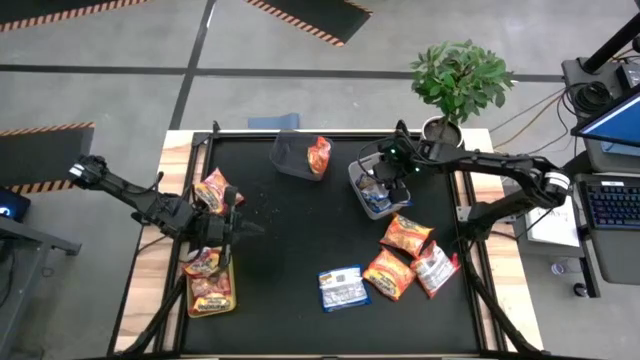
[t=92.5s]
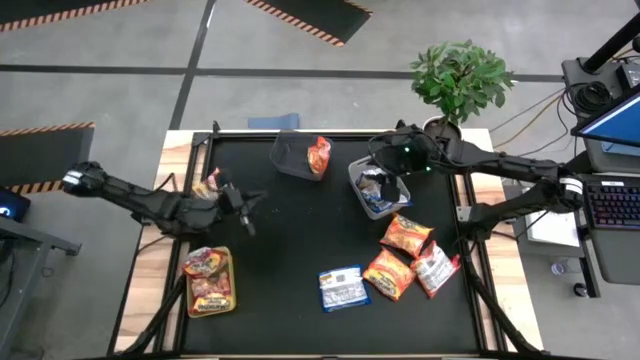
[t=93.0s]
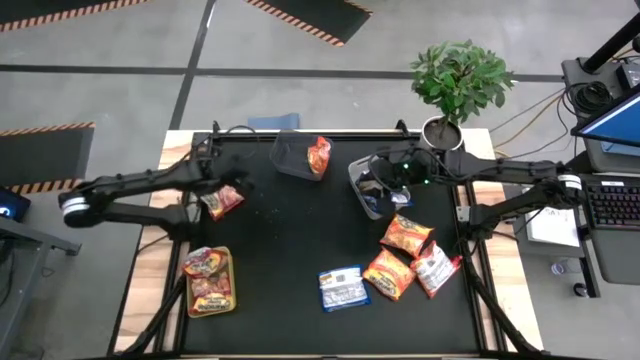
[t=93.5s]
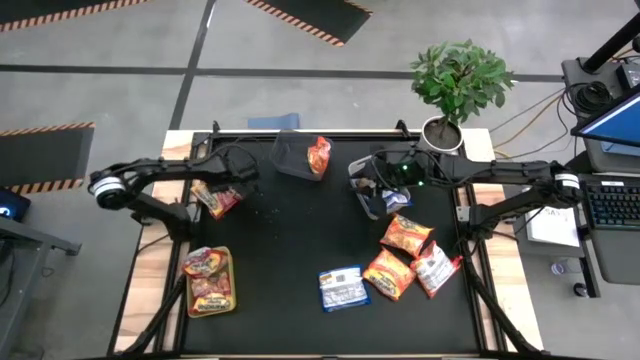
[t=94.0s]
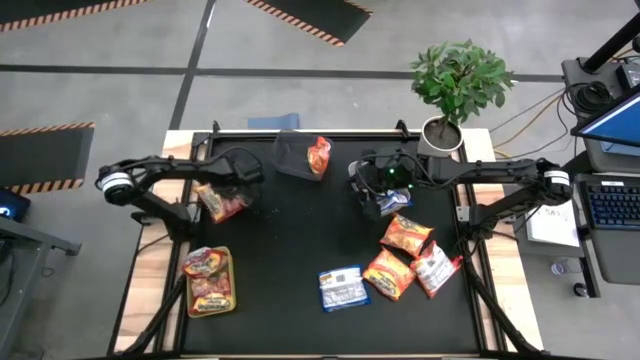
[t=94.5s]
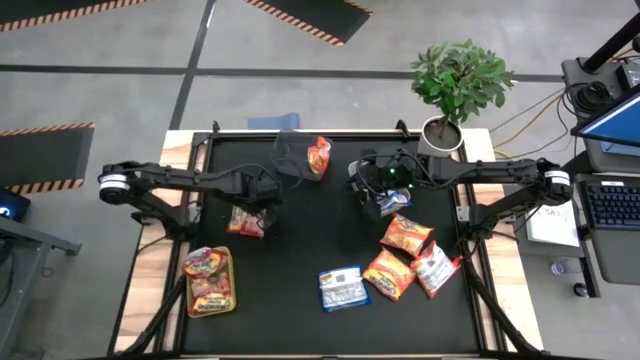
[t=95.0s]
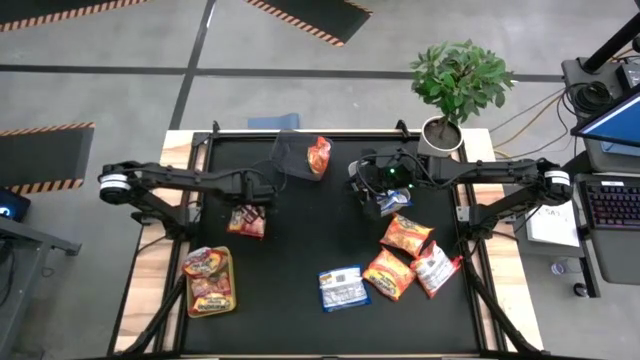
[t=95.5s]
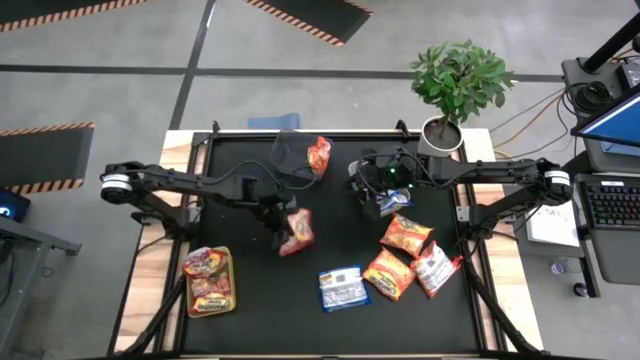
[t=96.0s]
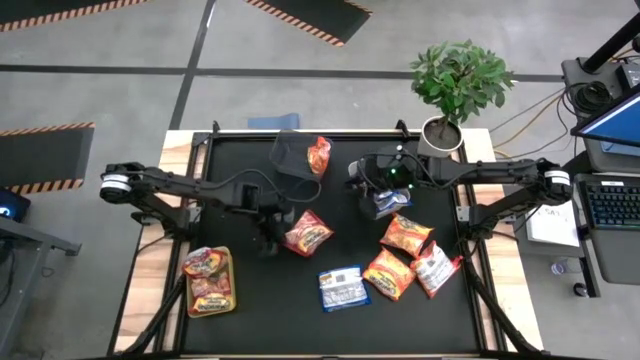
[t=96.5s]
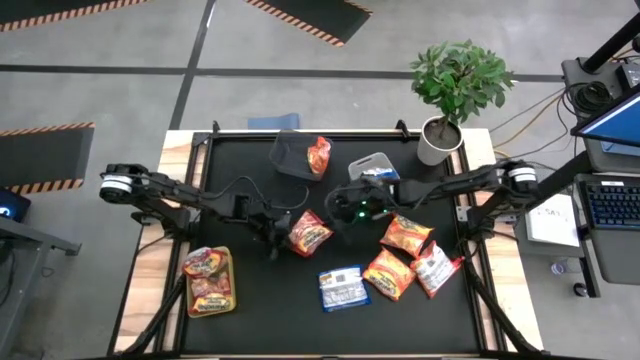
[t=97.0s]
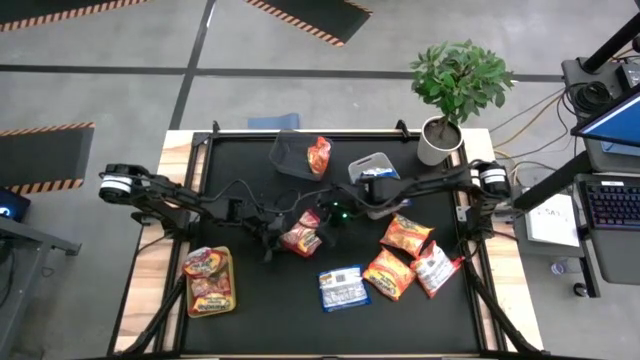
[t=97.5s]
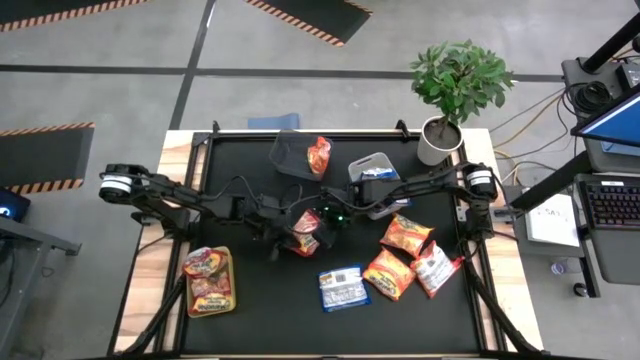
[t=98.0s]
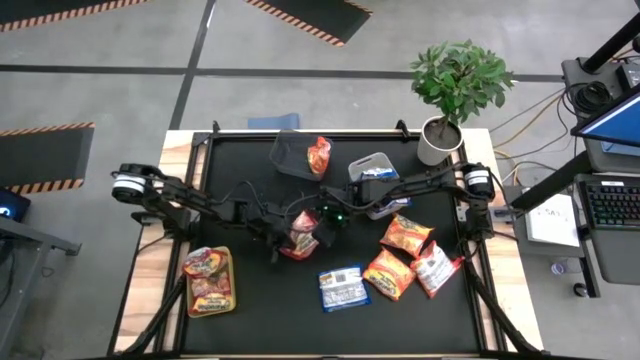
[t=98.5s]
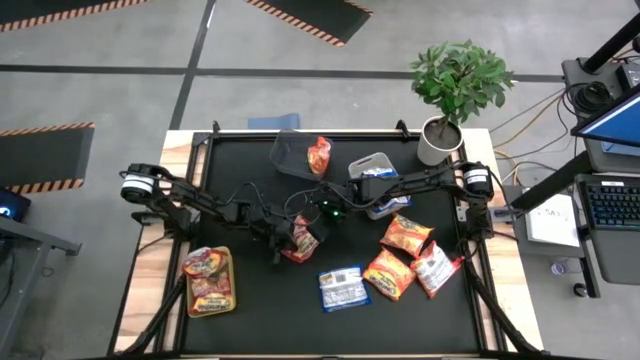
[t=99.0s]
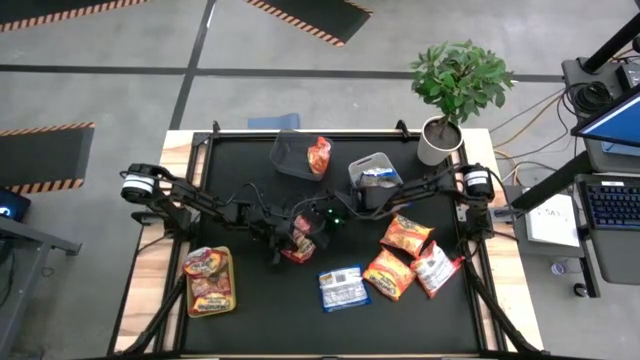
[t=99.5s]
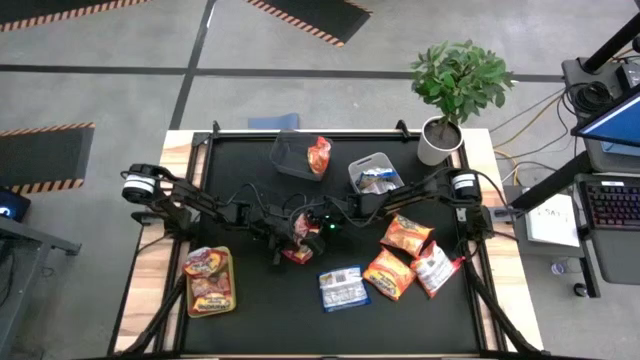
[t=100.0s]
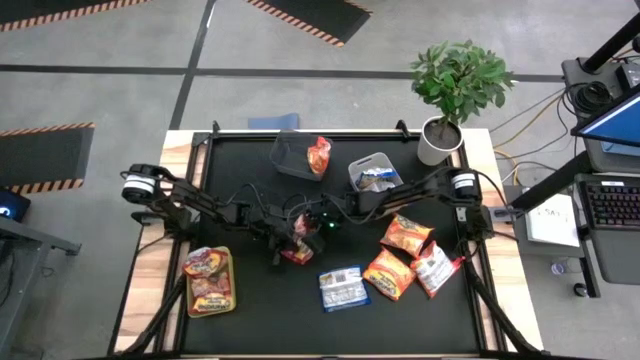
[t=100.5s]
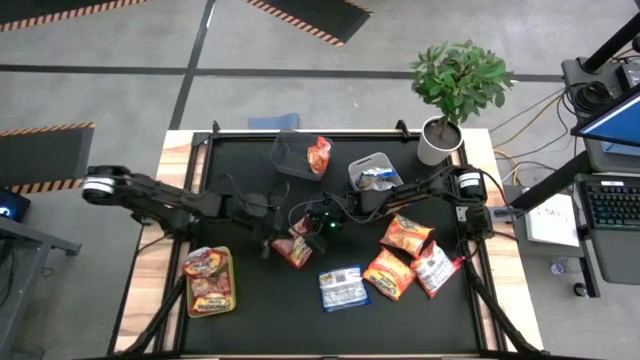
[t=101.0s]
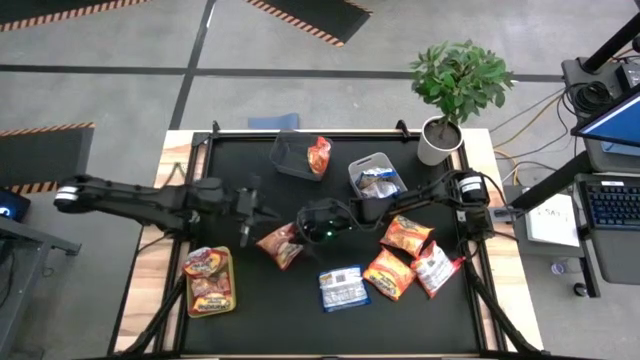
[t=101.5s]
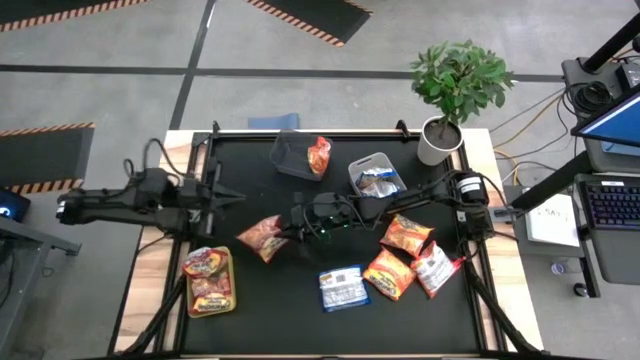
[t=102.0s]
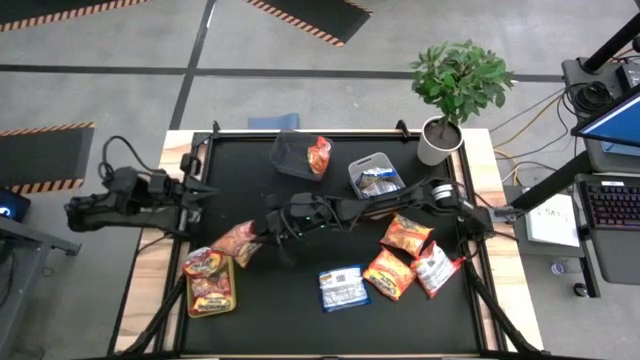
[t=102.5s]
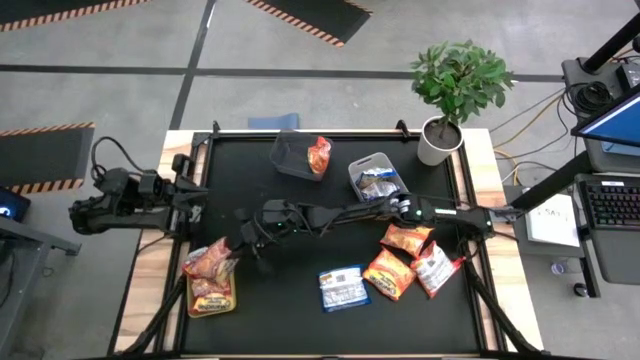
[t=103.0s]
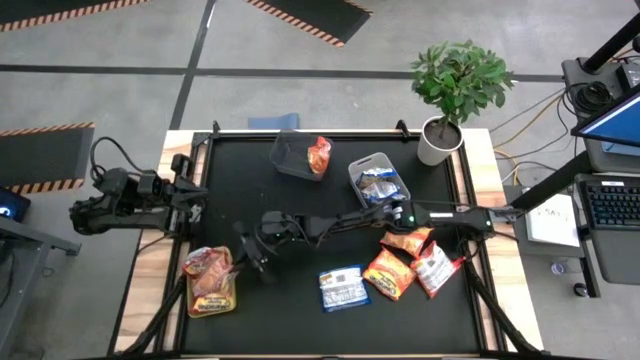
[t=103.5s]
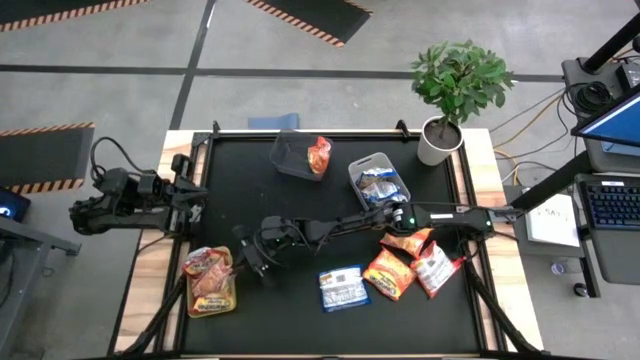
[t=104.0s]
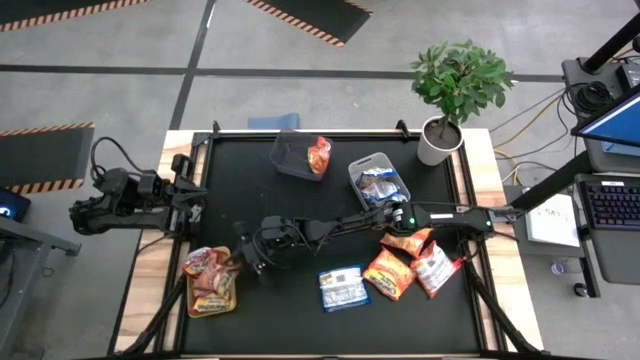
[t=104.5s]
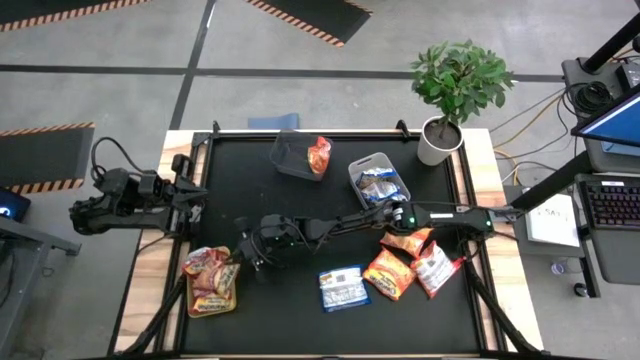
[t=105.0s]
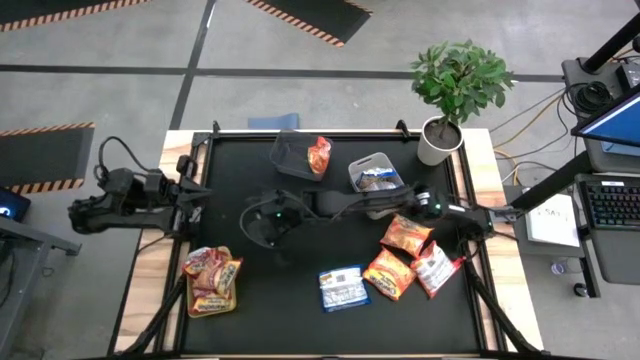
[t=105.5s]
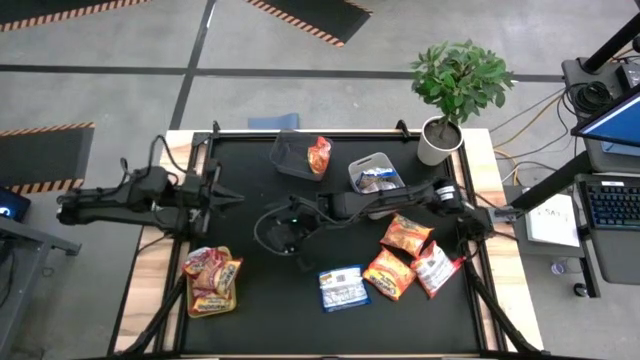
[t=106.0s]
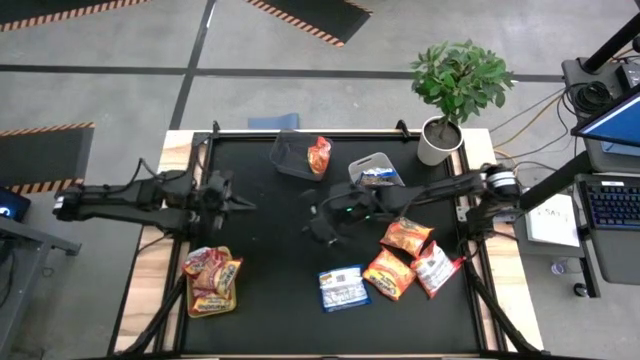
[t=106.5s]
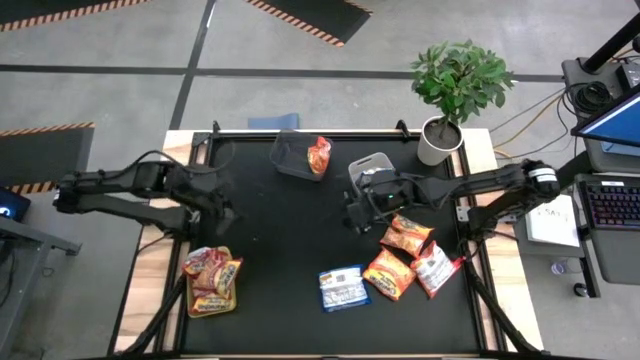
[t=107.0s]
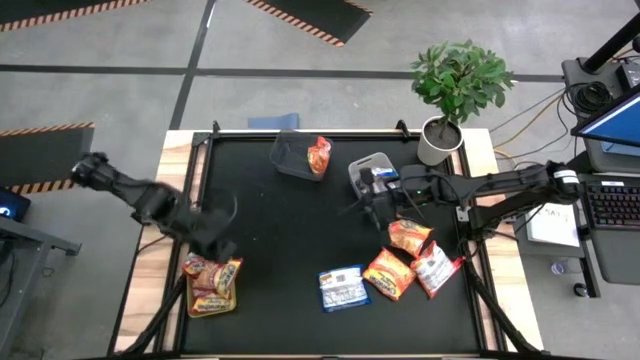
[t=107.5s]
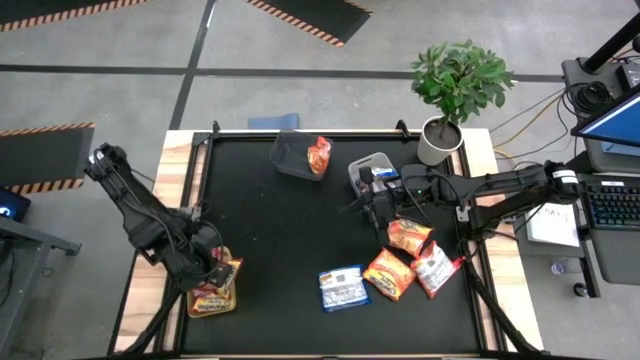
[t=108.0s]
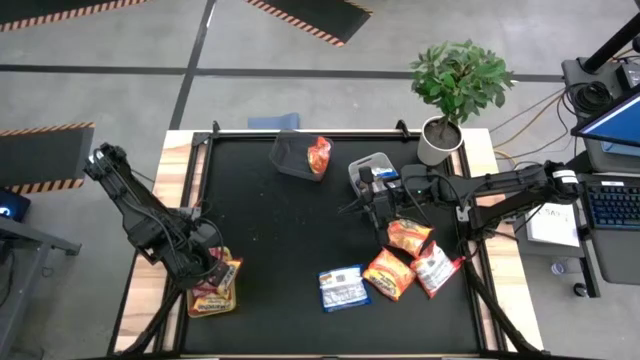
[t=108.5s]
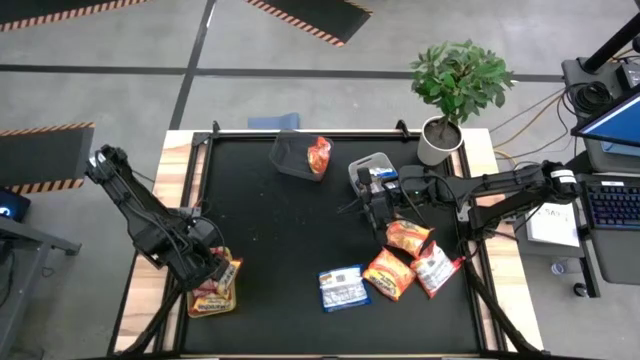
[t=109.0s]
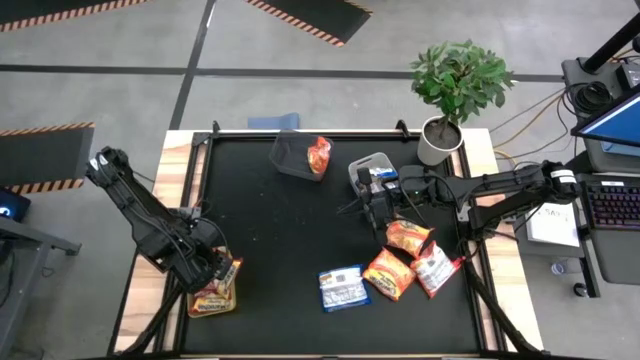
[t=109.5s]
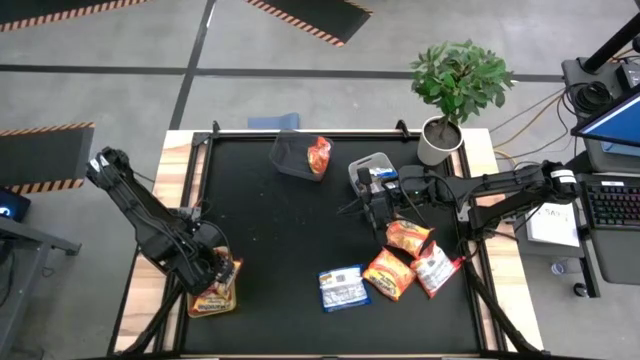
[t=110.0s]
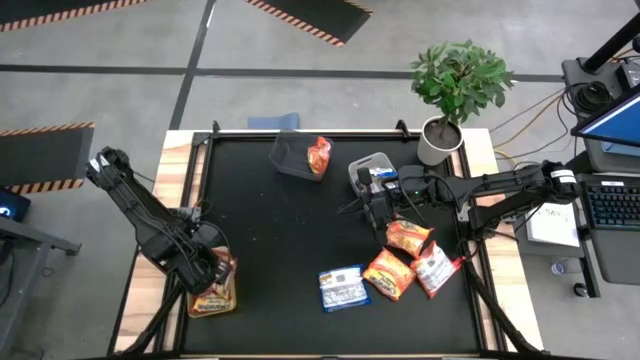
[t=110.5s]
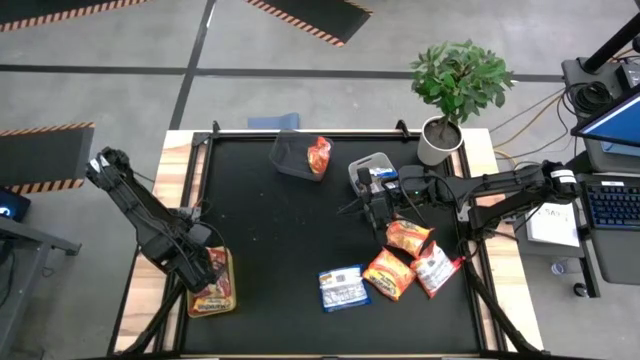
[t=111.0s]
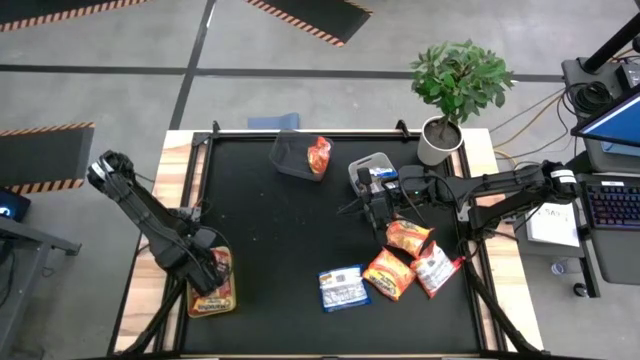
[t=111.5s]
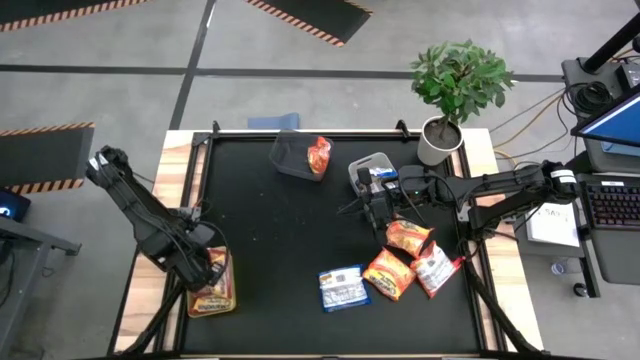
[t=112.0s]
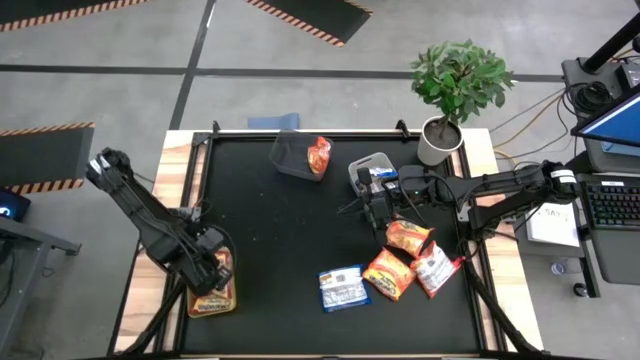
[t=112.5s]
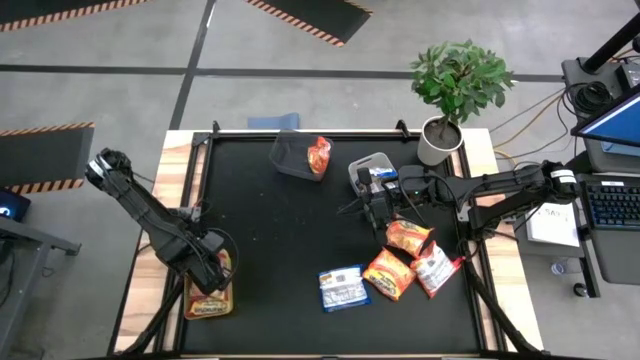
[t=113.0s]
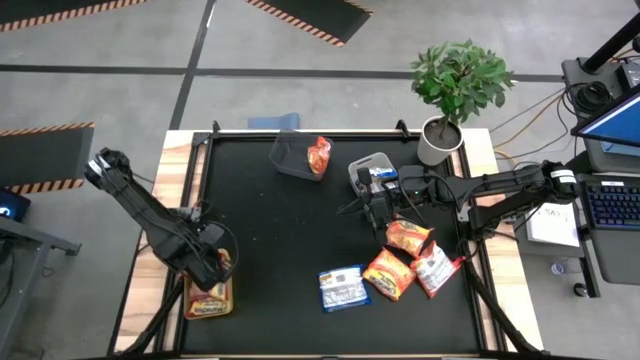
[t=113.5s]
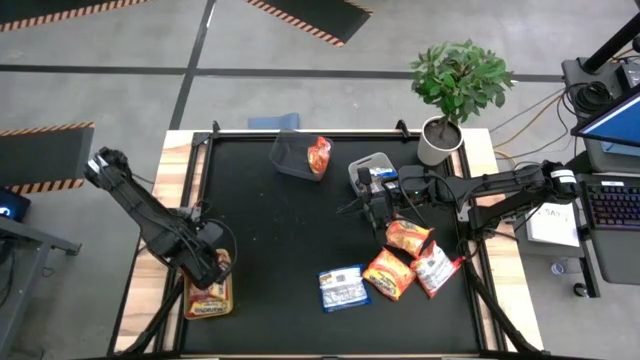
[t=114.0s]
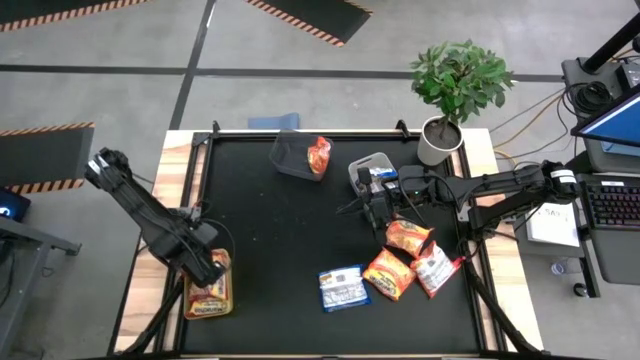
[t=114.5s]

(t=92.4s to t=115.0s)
Task: Sort Maruchan noodles
Put the red noodle back into the yellow bin
